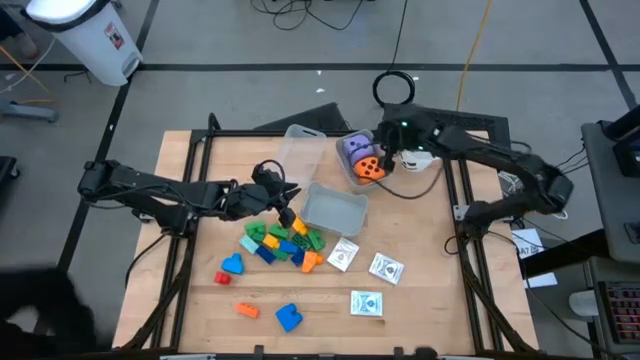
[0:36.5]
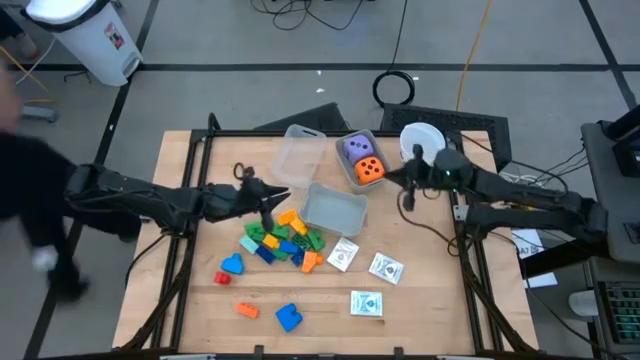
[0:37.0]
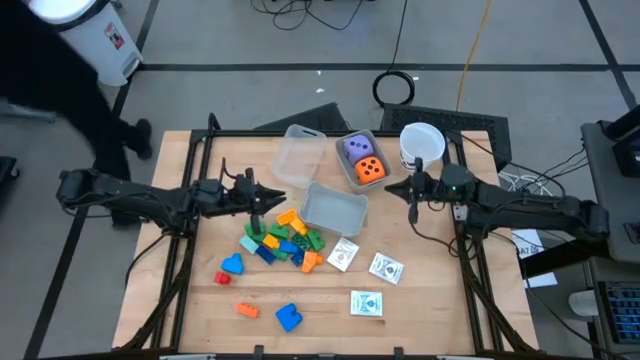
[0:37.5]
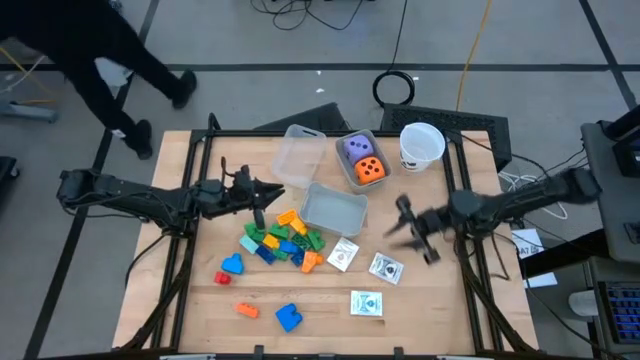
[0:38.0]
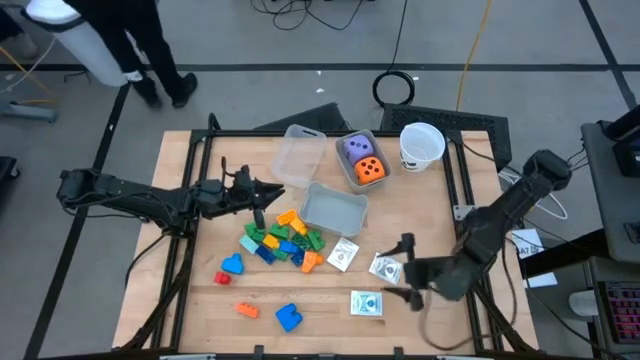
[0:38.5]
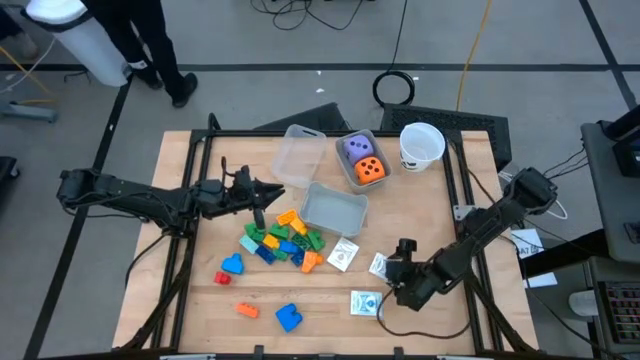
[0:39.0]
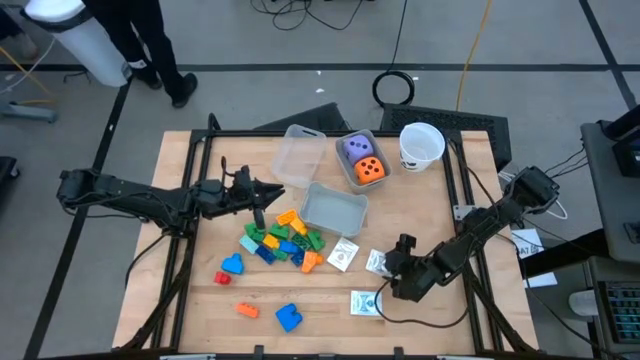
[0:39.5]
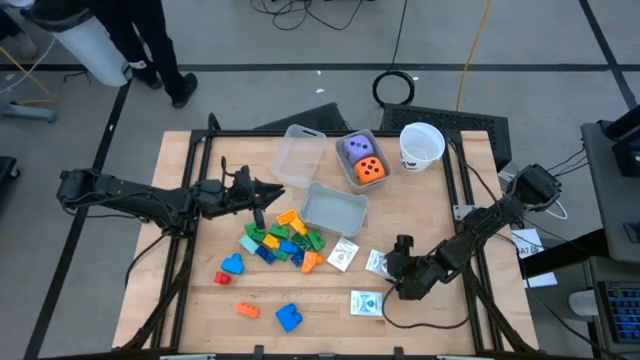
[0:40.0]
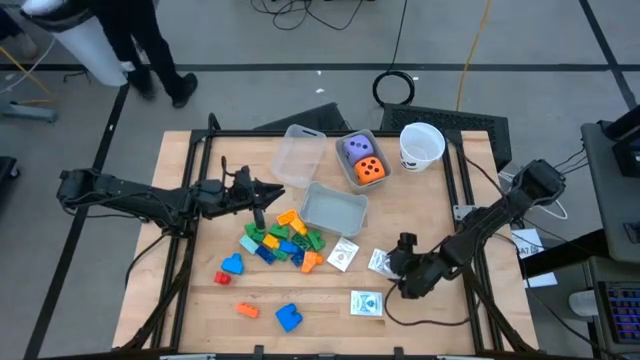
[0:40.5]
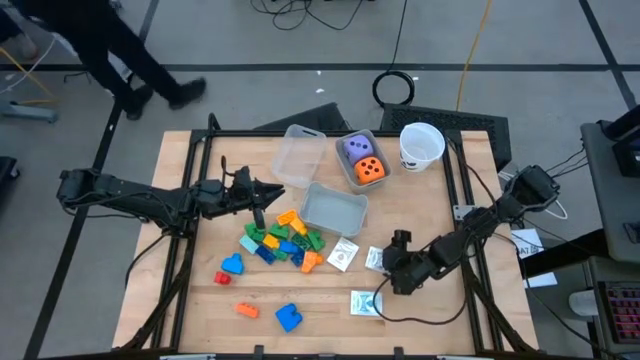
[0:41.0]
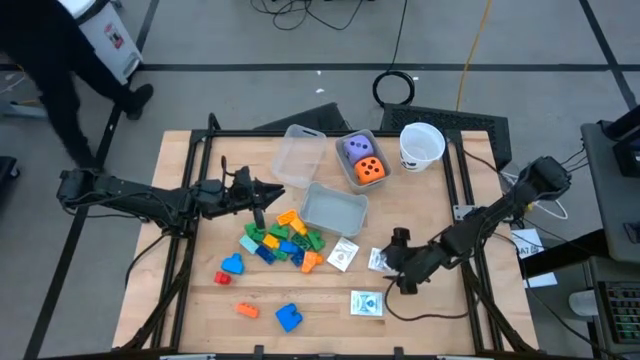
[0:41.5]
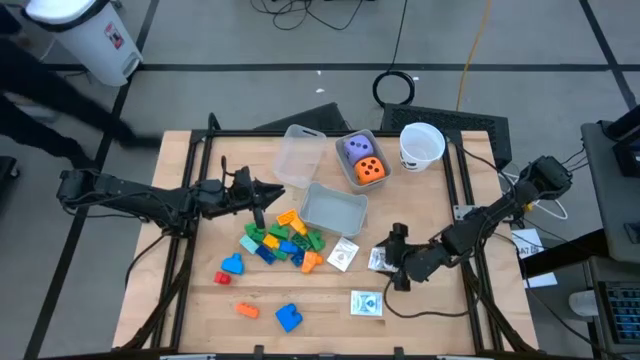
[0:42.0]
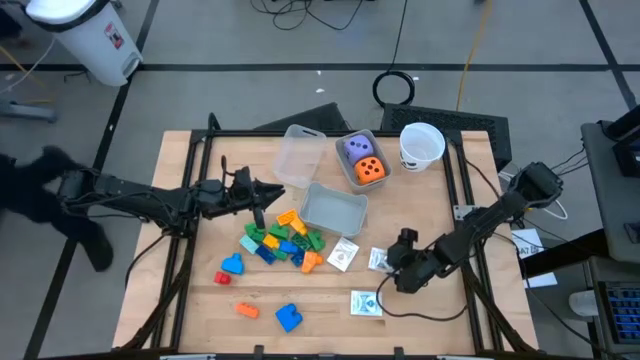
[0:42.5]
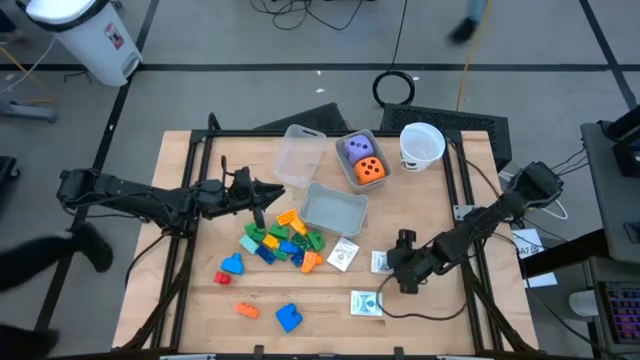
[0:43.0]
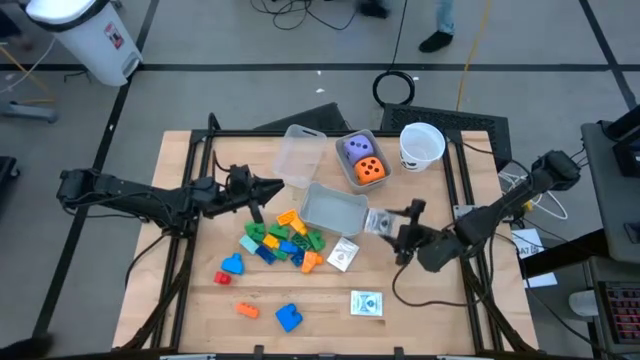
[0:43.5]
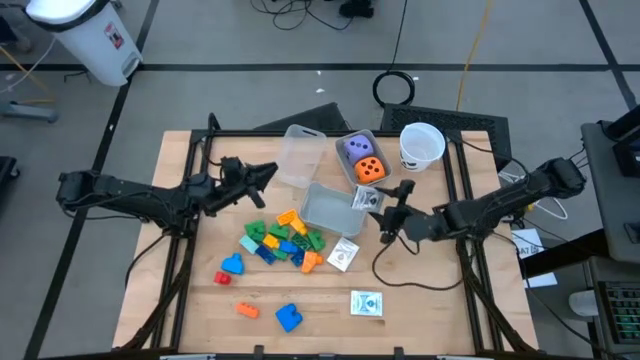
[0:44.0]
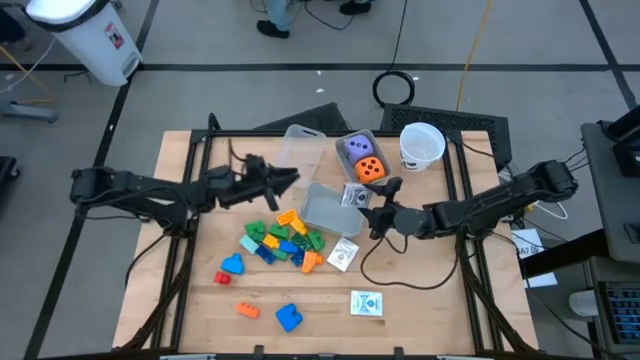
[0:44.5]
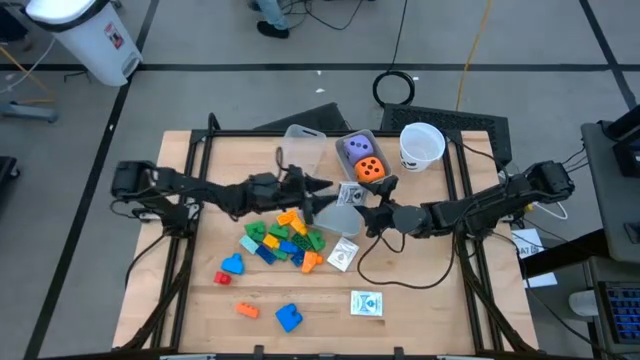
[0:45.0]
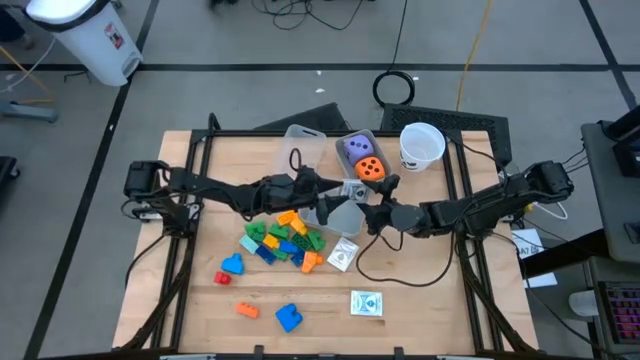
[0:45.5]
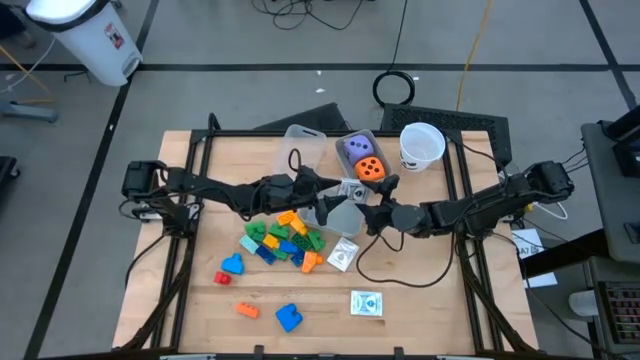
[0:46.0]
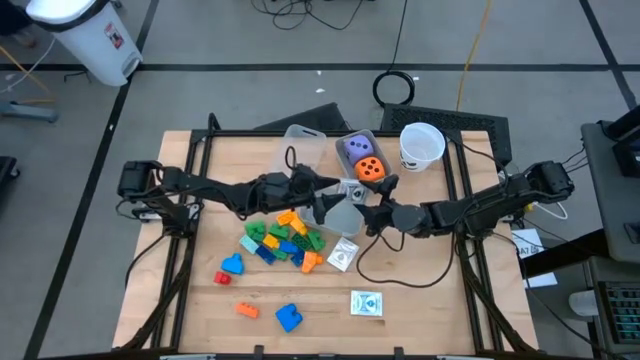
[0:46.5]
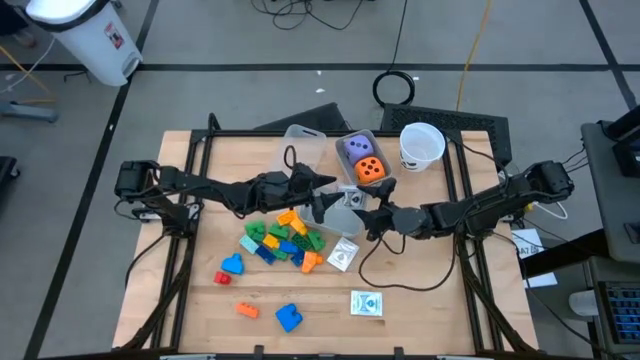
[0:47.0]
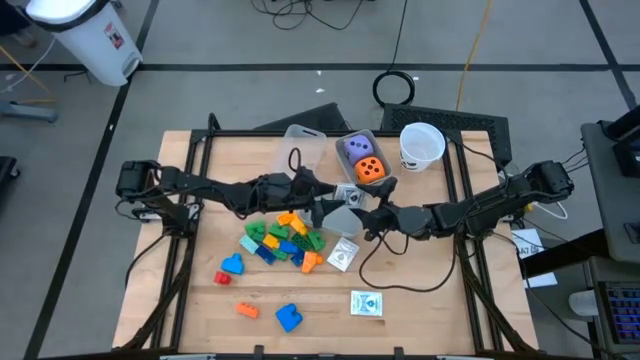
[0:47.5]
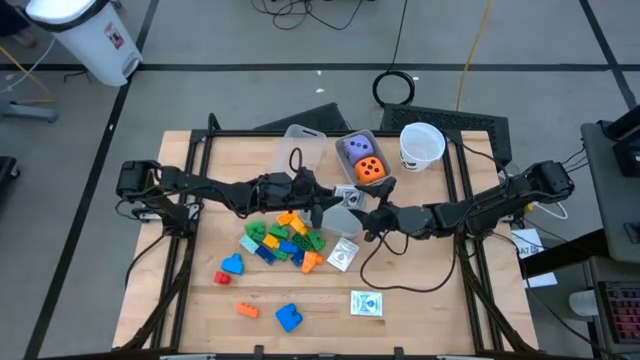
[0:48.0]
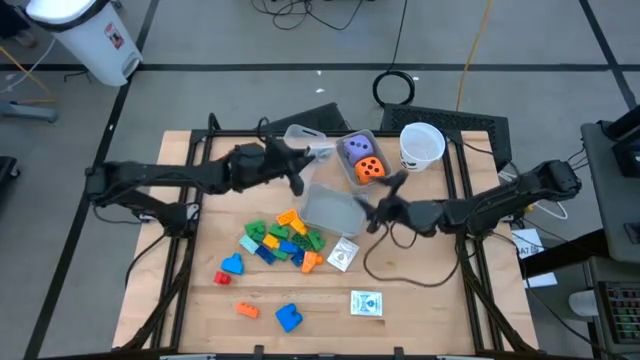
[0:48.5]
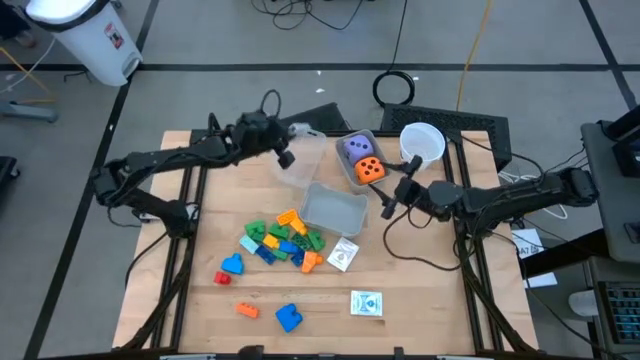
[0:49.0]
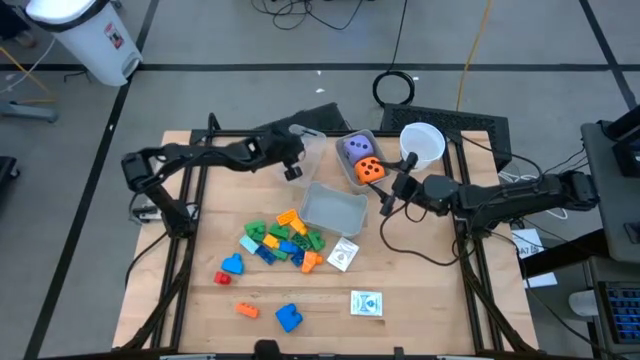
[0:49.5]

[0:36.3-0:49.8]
Task: Pick & Place Toys
Put the black playing card box into the transparent bin

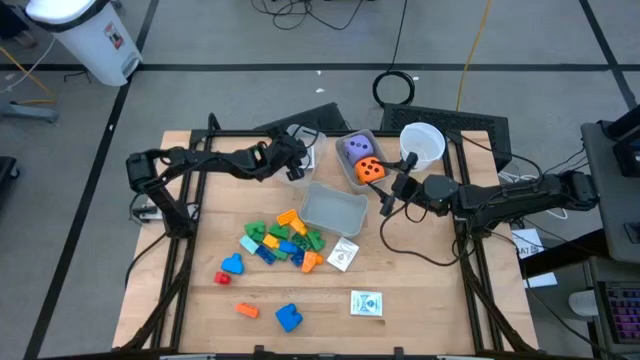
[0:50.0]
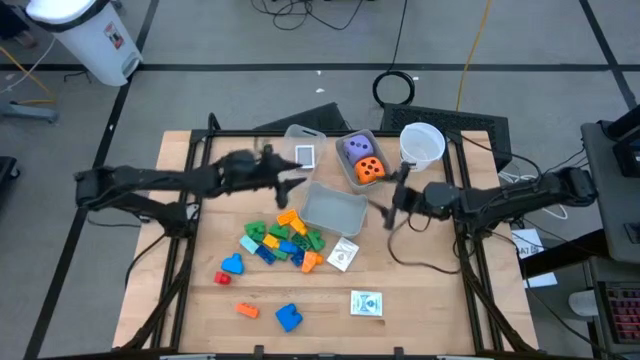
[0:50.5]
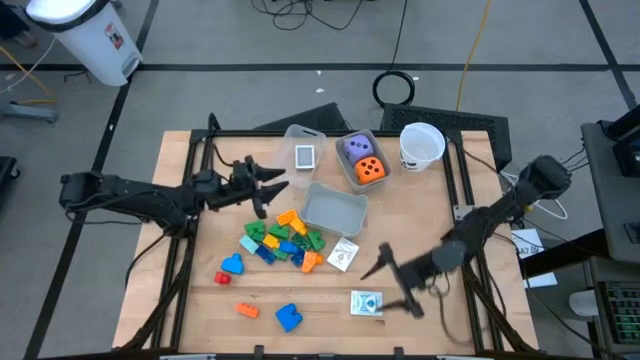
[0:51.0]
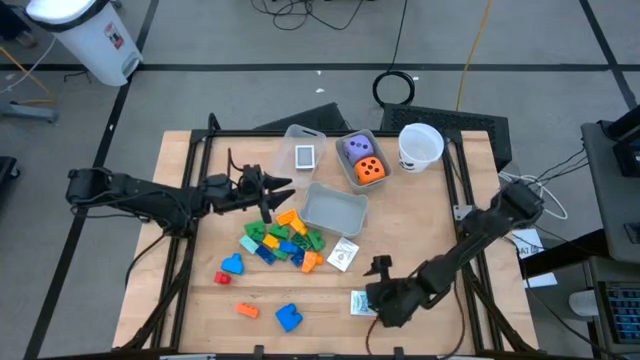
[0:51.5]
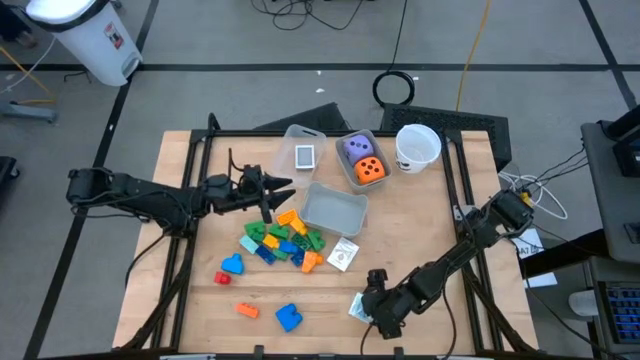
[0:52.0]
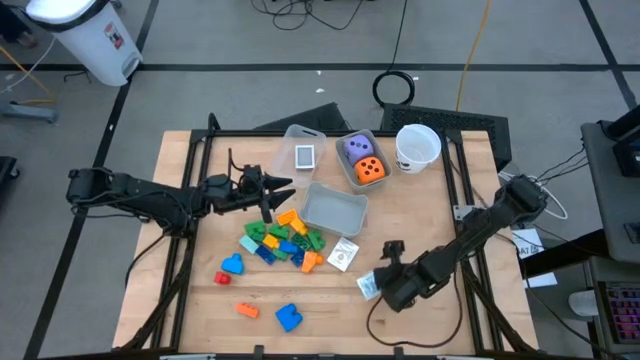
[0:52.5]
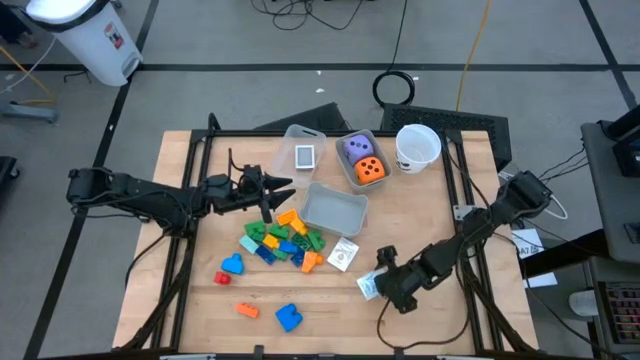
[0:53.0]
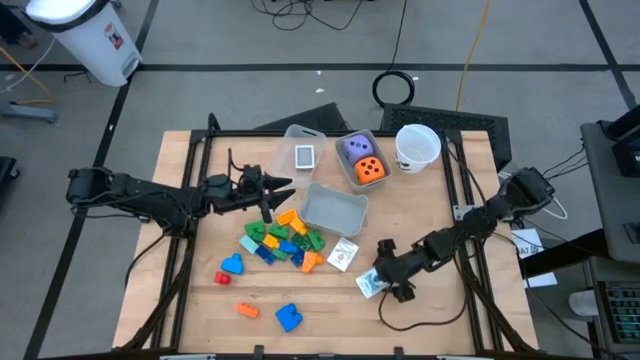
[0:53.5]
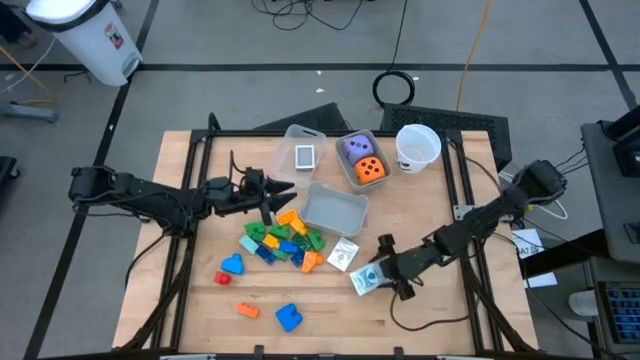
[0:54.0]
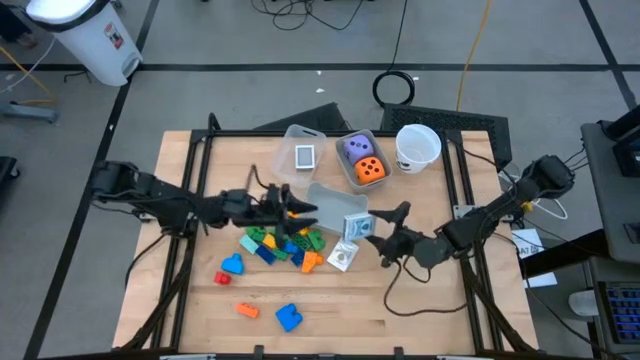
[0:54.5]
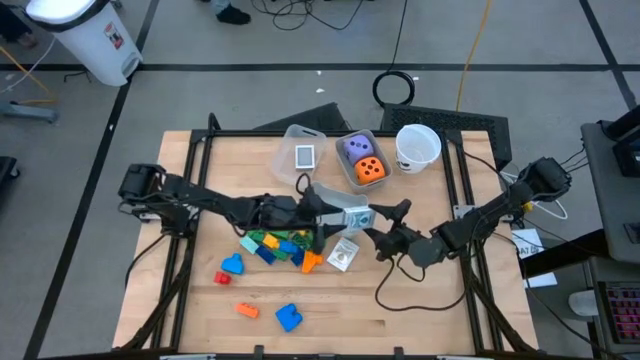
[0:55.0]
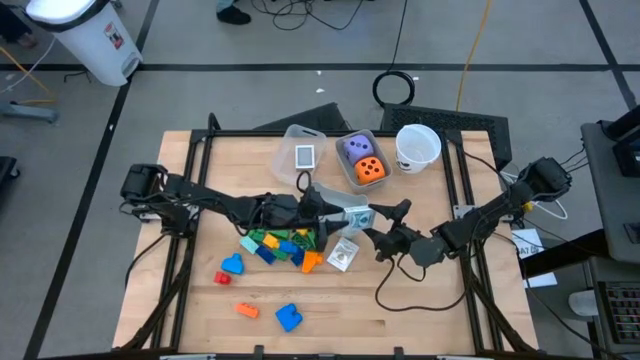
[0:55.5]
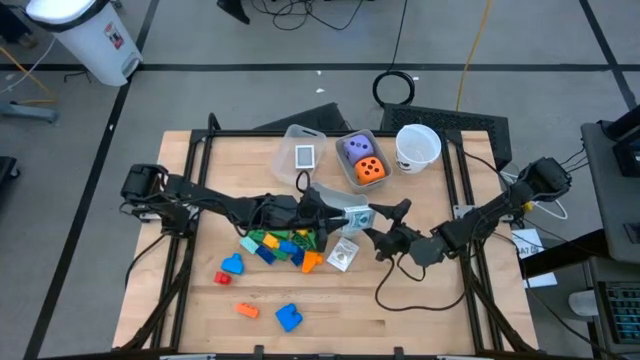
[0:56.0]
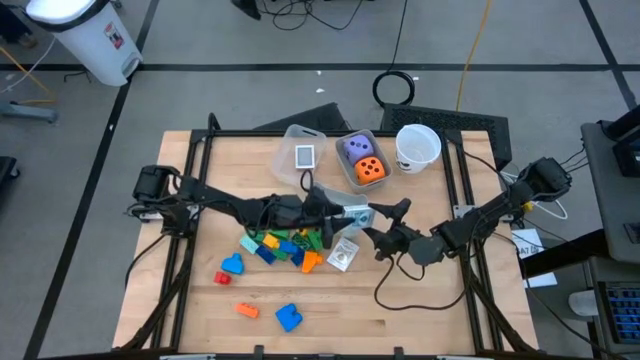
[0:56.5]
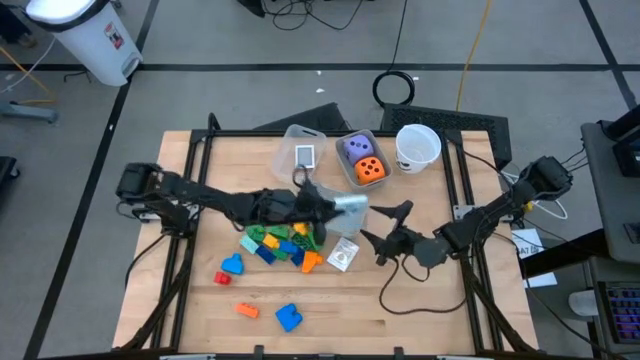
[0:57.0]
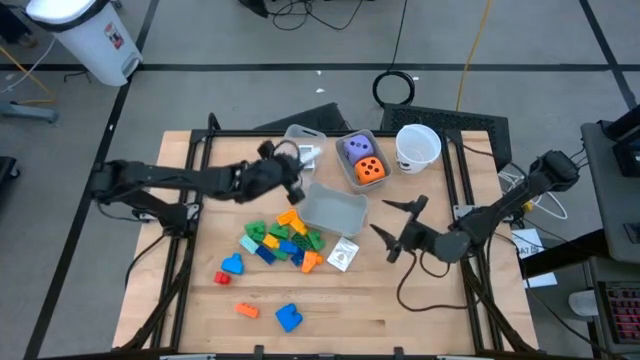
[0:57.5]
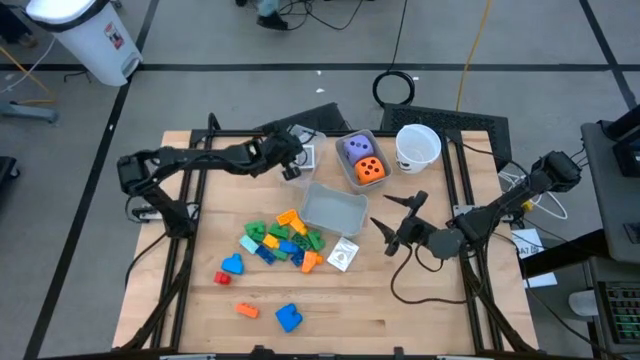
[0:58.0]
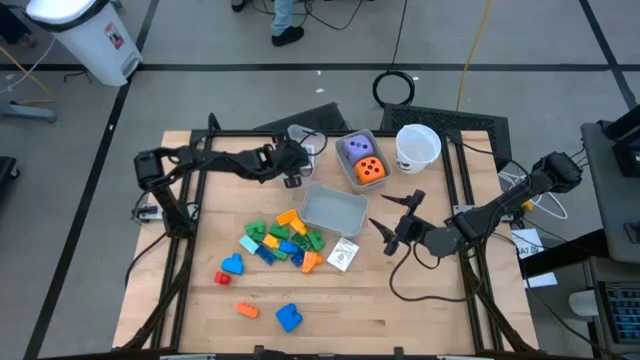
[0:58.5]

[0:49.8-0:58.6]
Put the blue playing card box into the transparent bin
